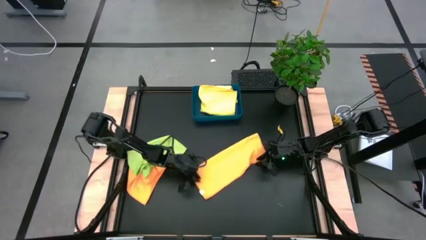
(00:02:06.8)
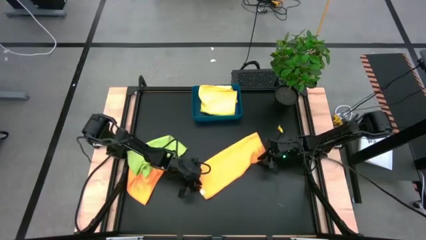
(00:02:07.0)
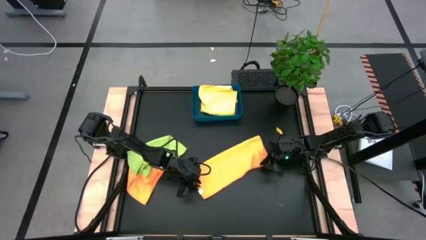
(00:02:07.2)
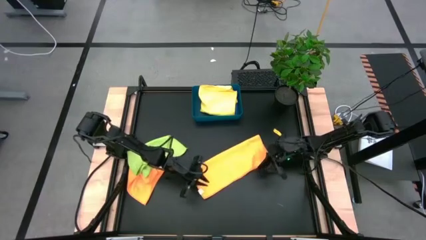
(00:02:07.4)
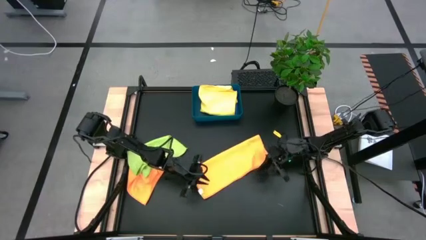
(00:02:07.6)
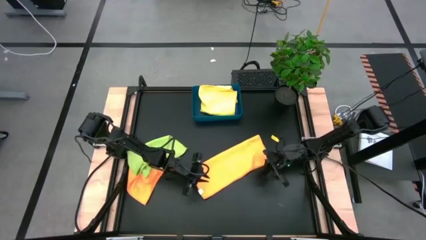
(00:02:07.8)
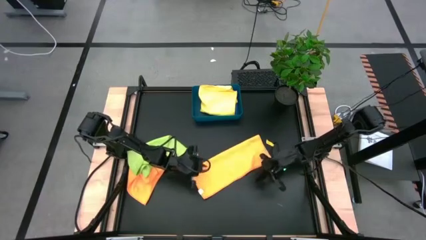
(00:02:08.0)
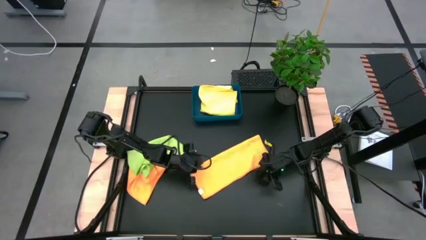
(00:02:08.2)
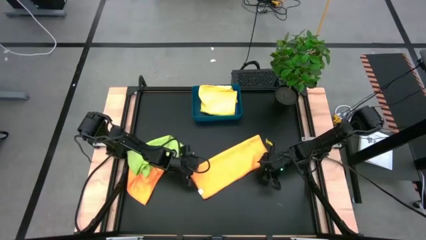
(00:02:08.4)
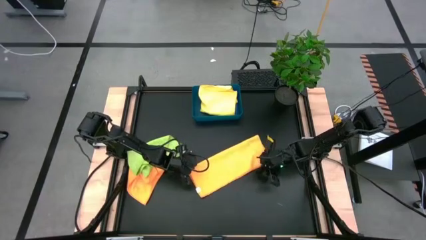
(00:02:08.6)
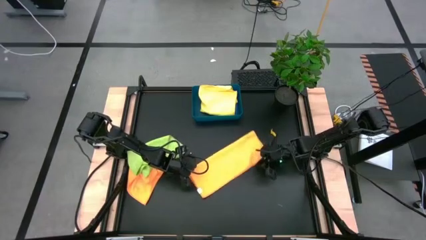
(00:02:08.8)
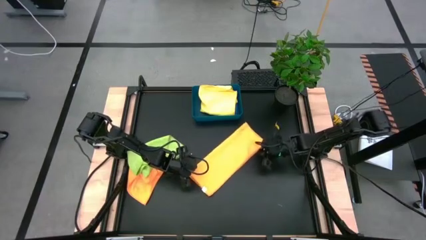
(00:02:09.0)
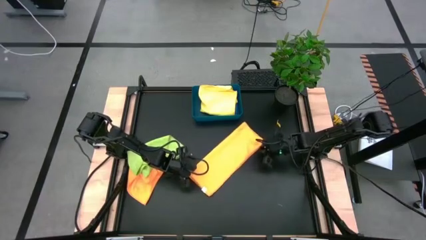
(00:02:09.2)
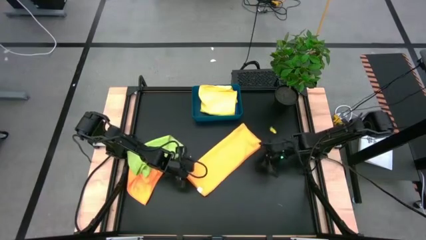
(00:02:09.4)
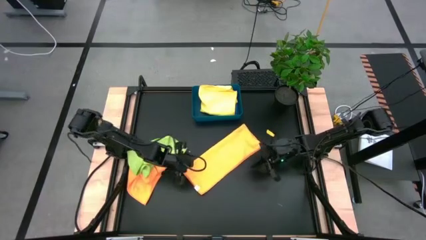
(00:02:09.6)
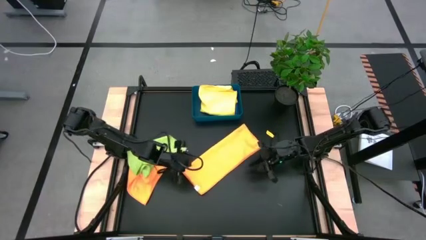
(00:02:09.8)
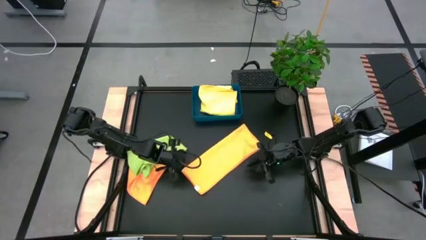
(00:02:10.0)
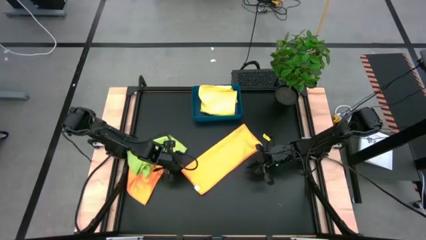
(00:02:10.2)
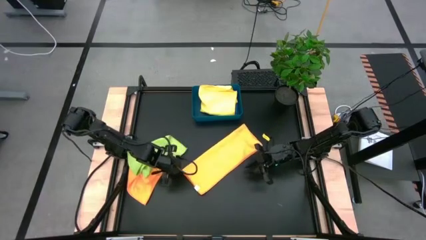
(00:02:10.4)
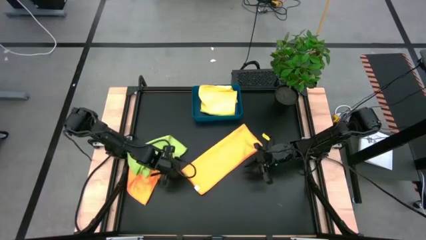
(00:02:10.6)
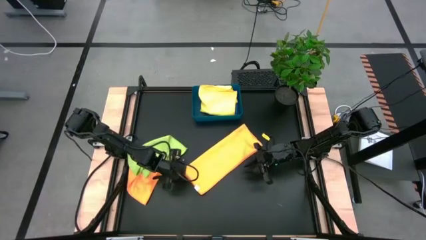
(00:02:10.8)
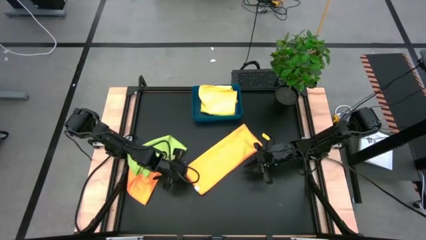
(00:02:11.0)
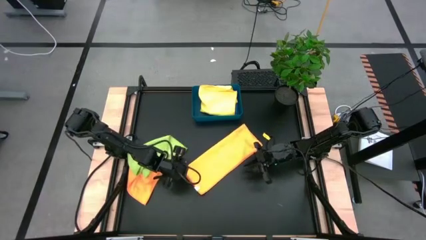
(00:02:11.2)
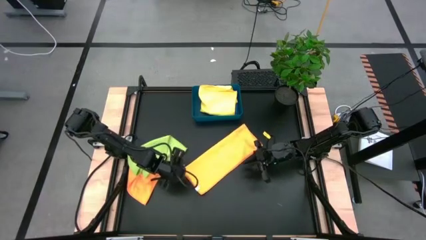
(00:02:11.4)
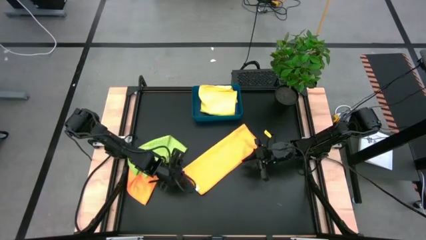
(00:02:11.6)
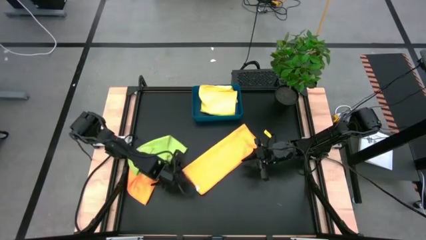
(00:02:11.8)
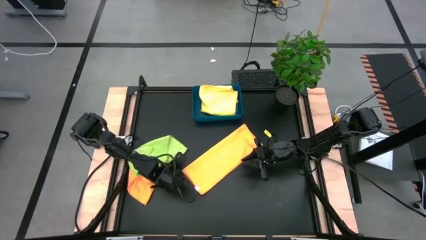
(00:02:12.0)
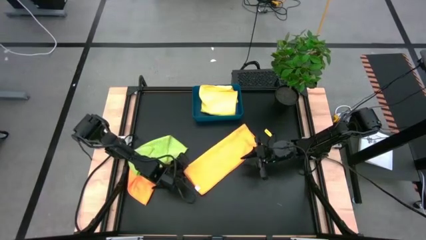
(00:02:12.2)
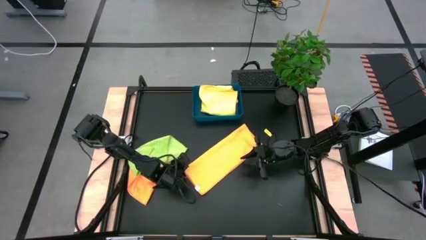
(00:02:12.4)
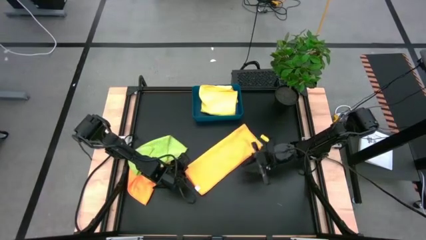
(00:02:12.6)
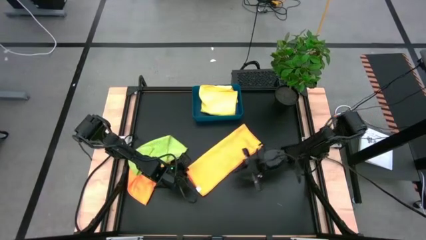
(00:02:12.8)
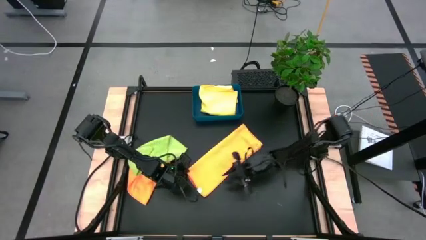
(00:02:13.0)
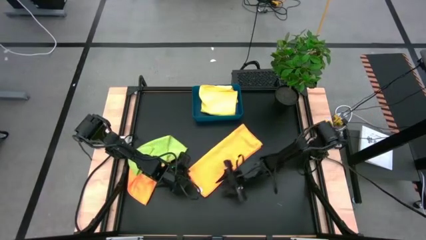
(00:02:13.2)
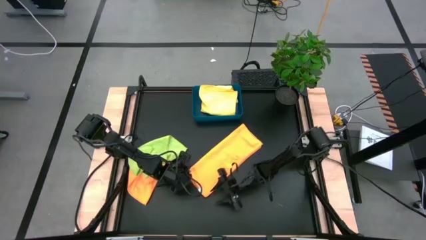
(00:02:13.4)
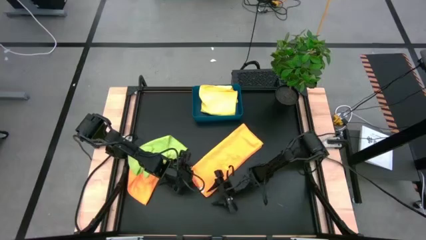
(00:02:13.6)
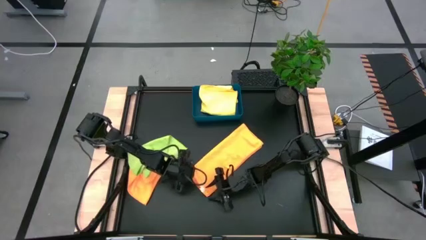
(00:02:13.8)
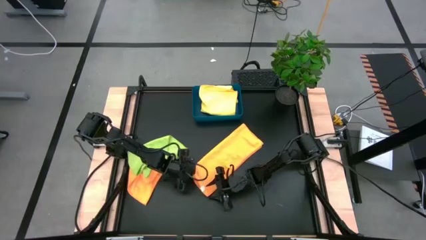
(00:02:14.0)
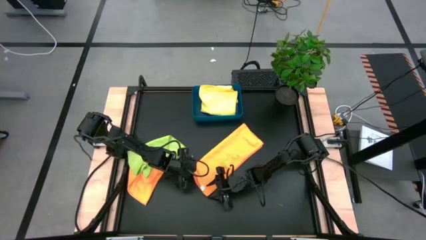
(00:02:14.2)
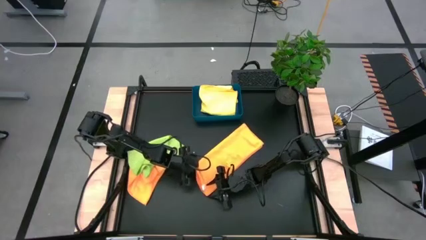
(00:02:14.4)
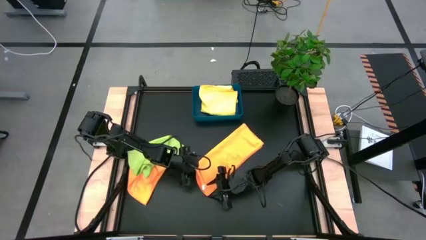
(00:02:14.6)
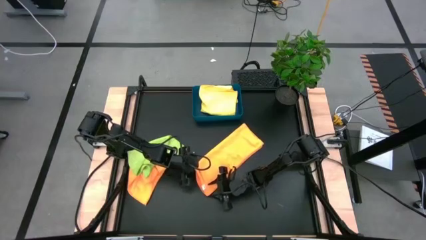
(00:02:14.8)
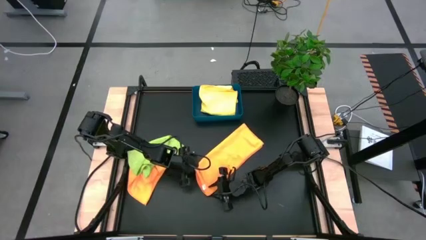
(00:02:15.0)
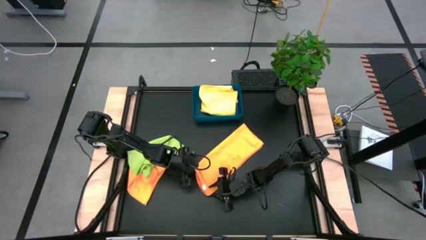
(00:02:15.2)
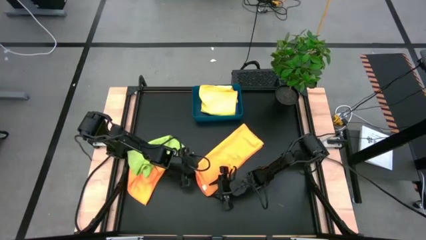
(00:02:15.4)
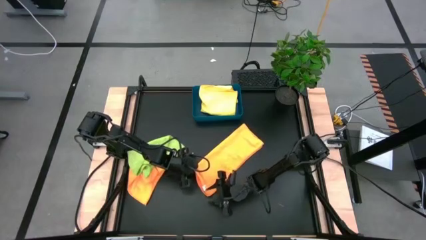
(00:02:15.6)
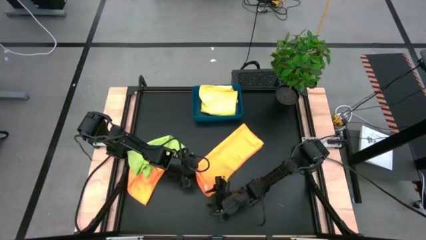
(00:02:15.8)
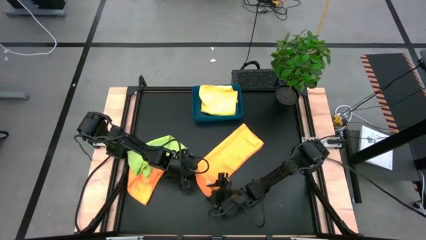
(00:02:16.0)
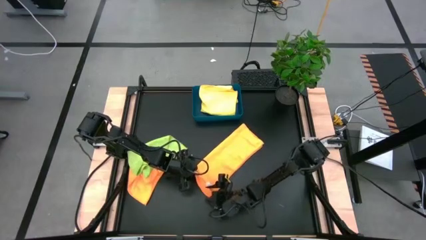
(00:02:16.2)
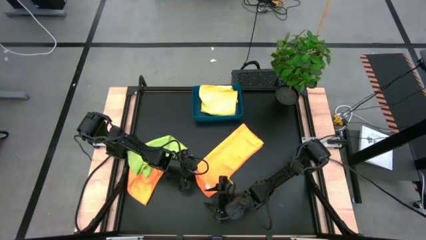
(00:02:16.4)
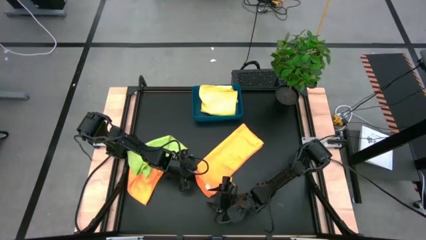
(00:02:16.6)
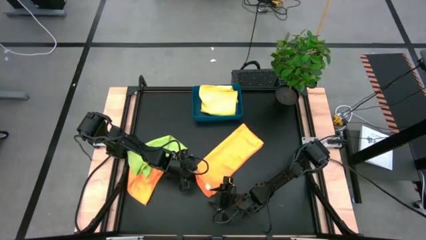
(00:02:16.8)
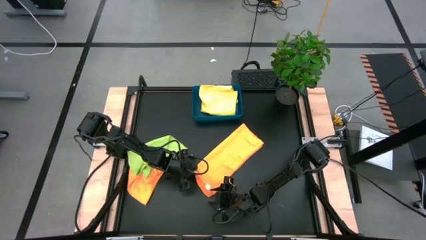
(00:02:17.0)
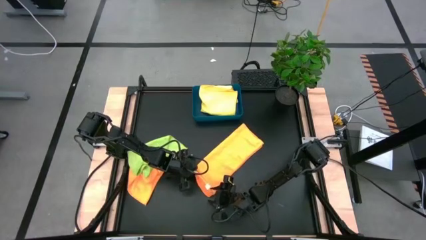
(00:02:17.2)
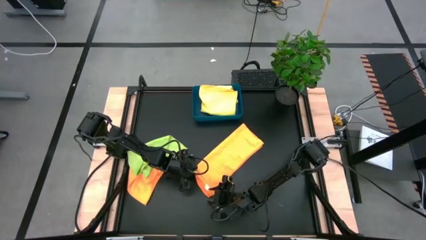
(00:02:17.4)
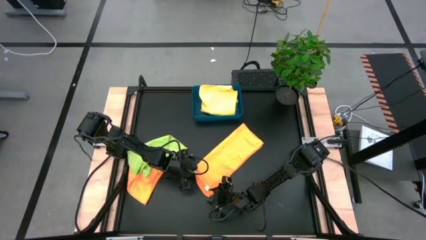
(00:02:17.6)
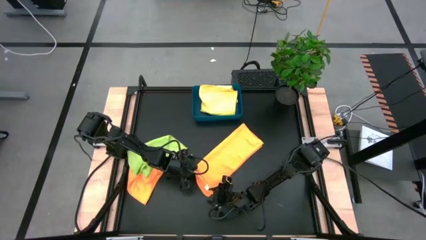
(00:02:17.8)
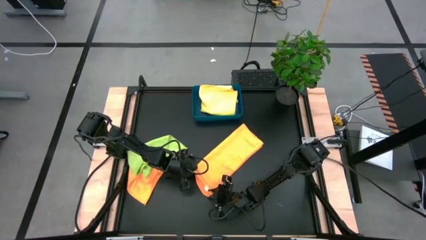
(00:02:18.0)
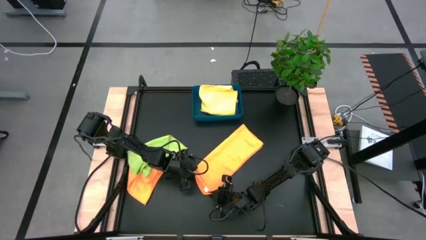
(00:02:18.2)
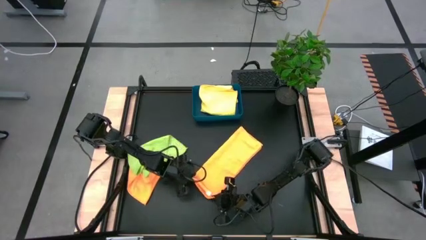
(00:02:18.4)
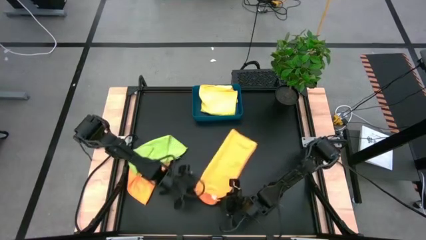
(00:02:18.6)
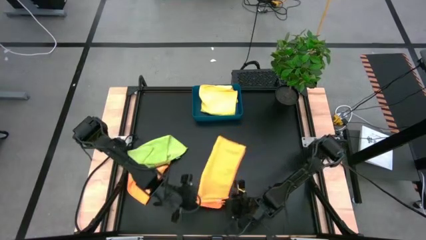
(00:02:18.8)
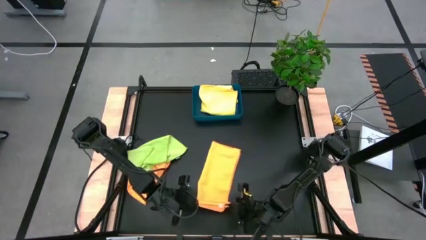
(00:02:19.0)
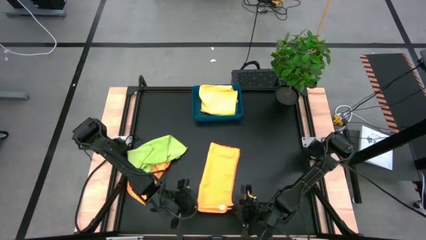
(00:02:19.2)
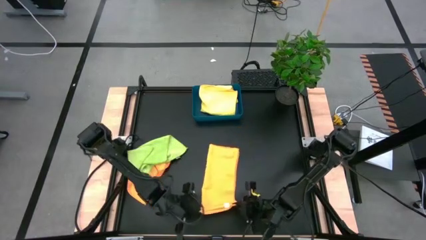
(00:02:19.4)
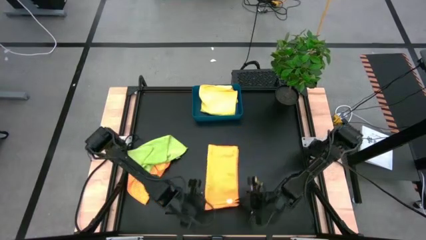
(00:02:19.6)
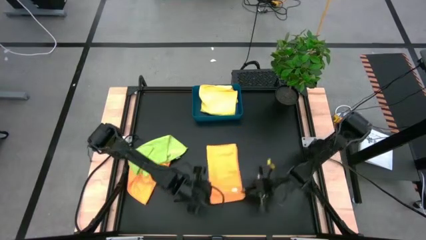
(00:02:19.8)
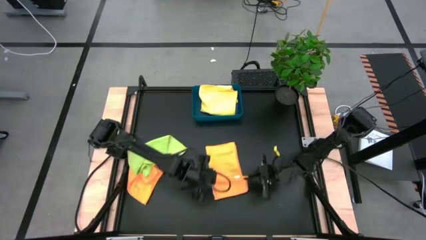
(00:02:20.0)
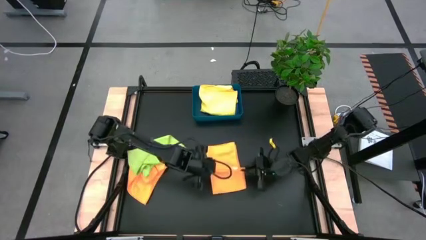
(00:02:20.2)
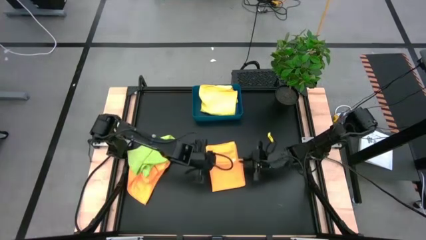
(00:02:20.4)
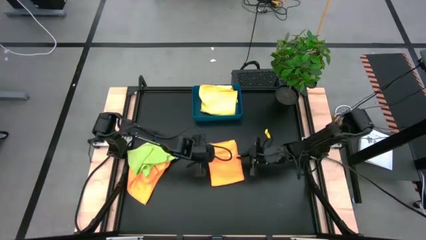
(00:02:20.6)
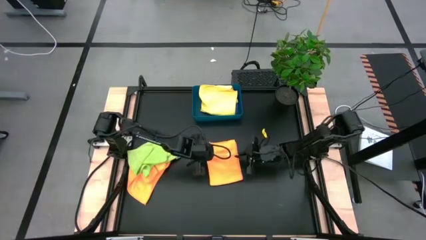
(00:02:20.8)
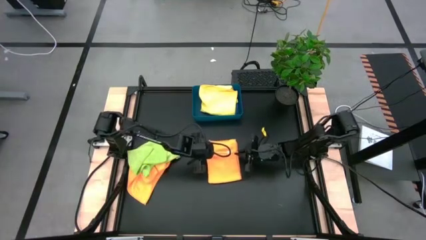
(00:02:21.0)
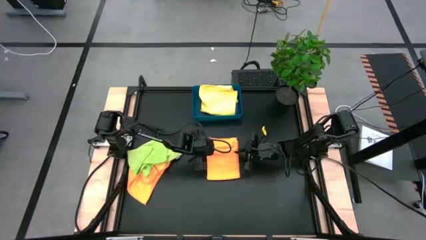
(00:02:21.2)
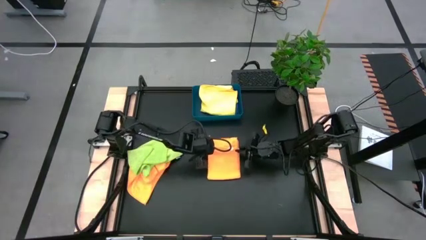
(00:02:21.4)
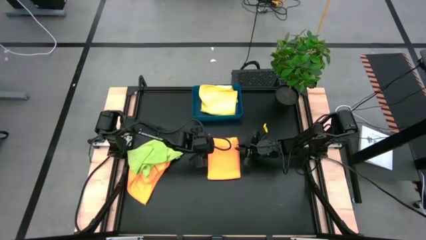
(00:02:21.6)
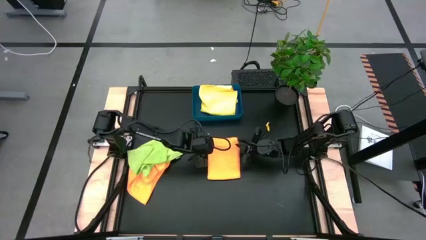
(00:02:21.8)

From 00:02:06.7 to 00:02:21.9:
Task: Fold microfiber towels
Fold the right orange microfiber cloth
